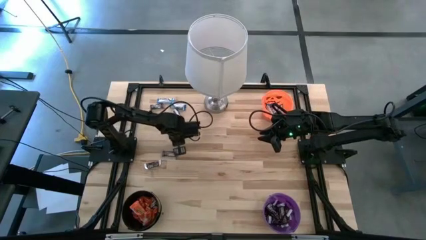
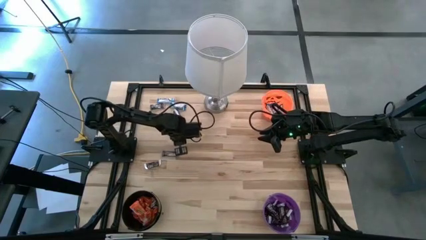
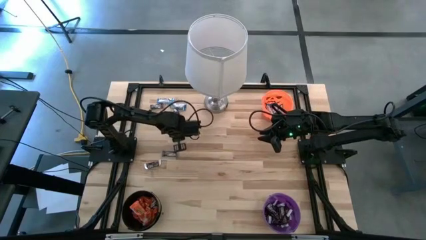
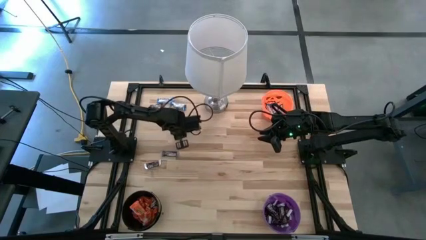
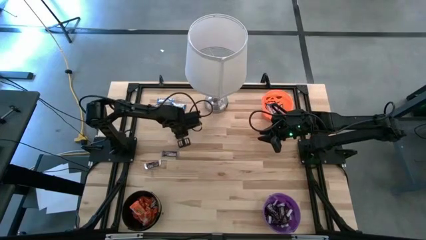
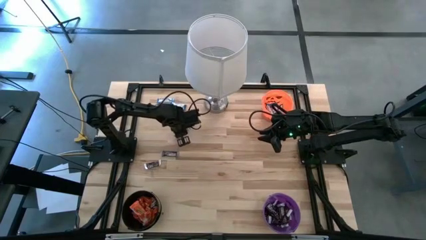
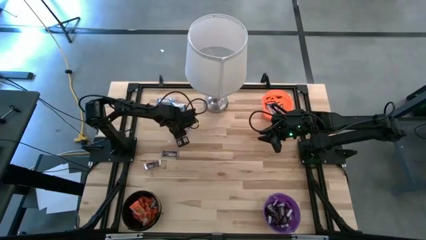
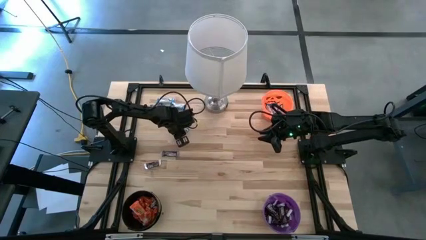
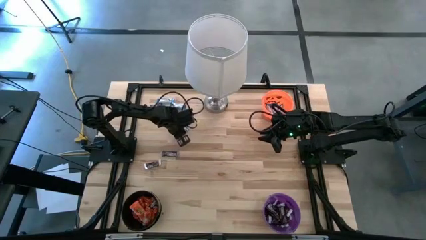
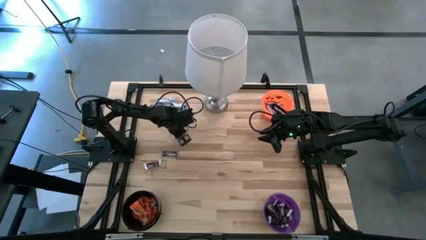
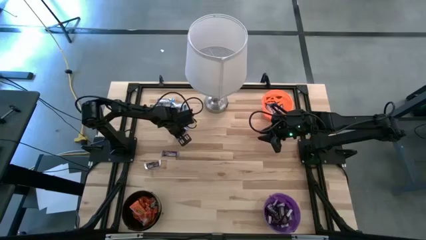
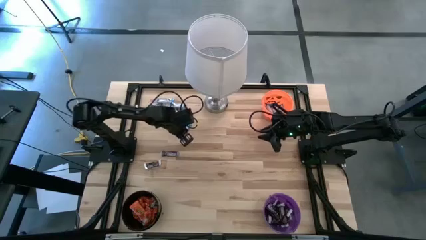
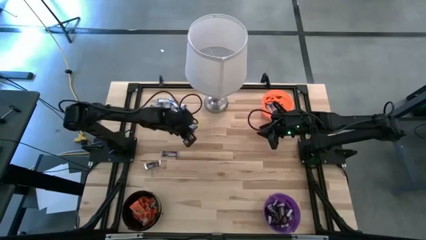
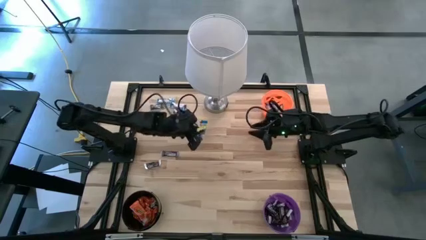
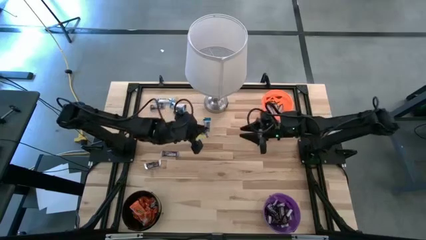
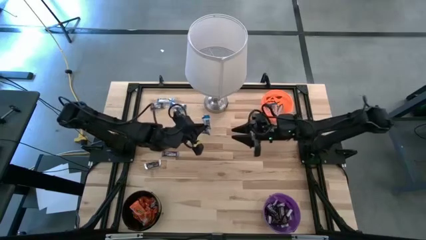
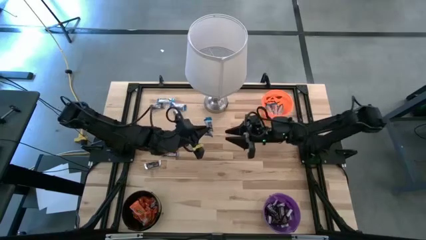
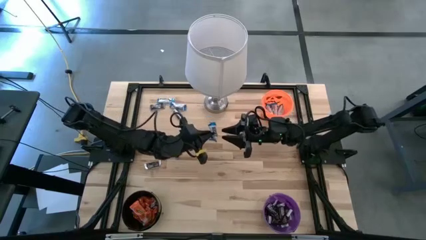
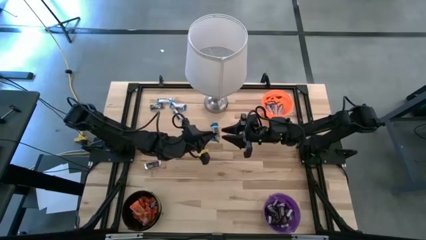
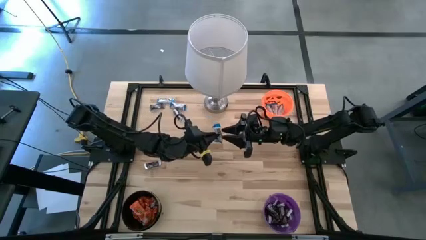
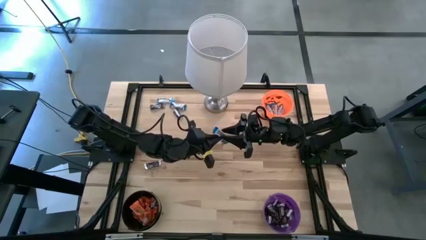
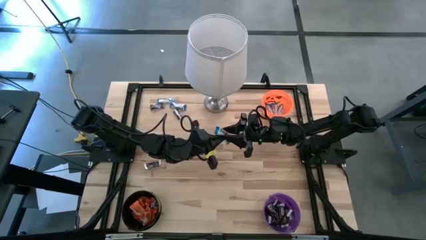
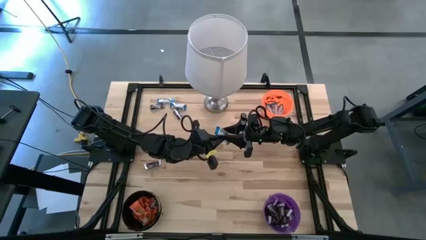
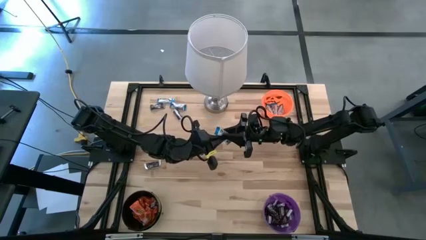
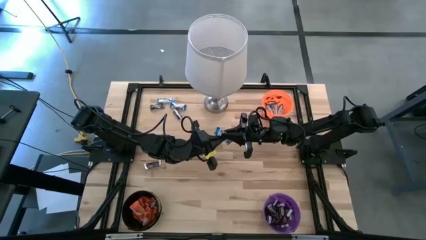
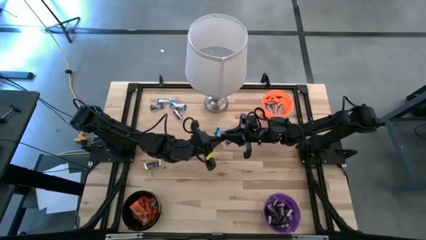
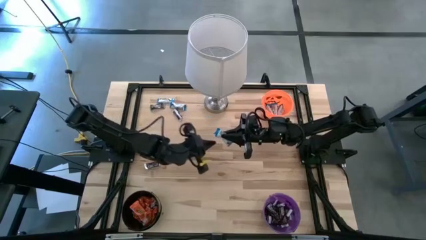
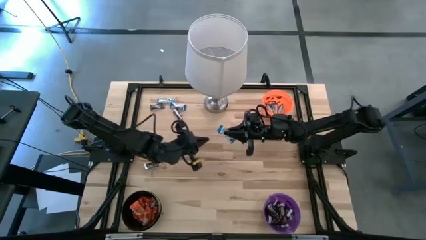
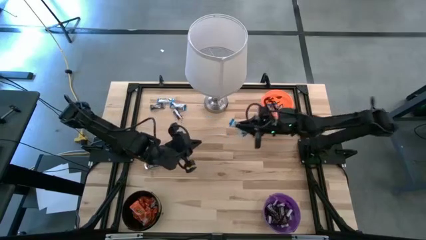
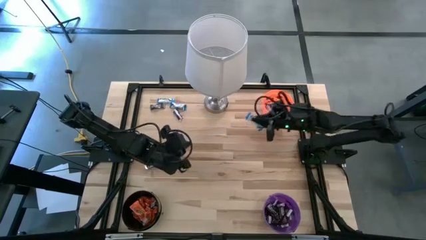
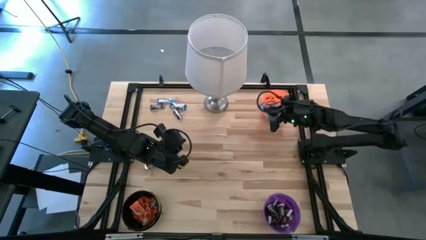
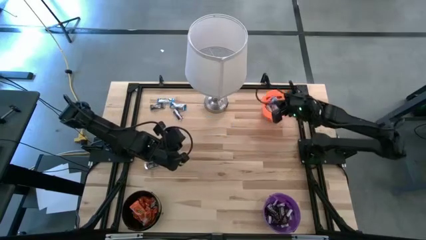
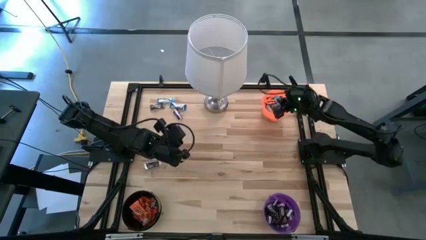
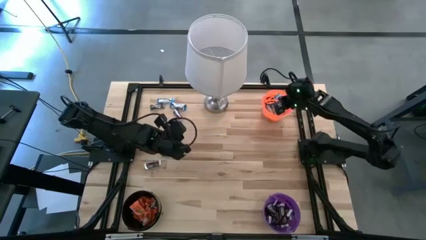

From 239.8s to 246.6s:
Task: Sort candy
Put the white chocolate bar into the orange bucket

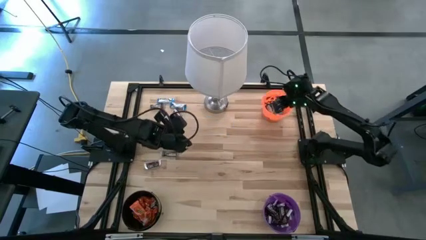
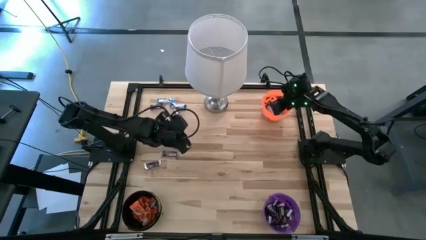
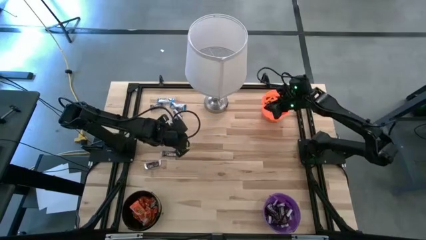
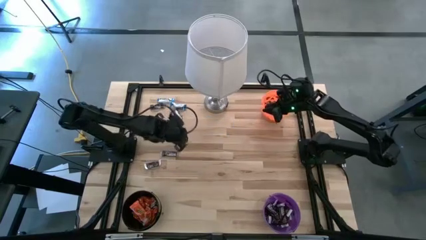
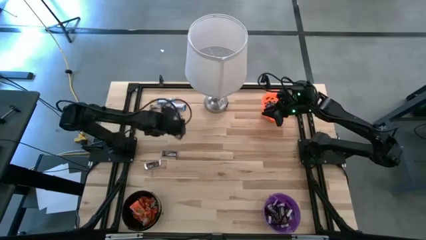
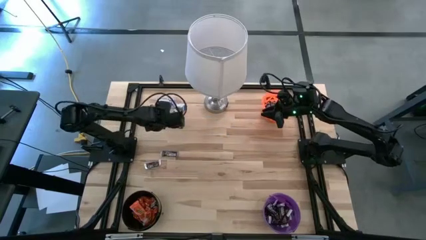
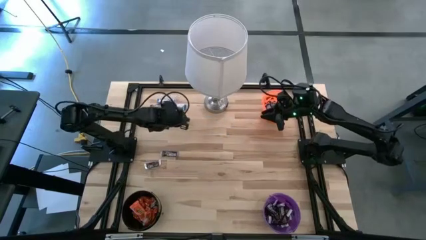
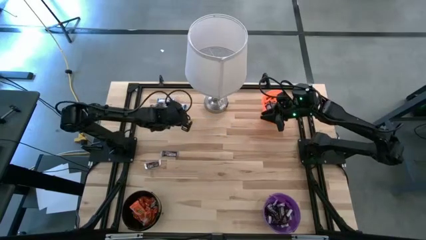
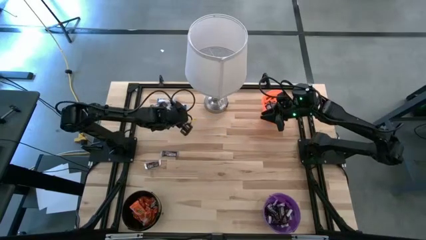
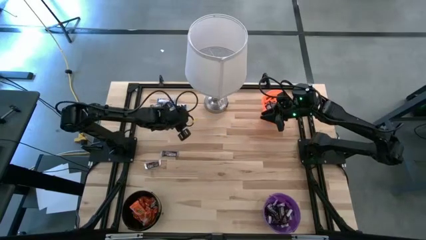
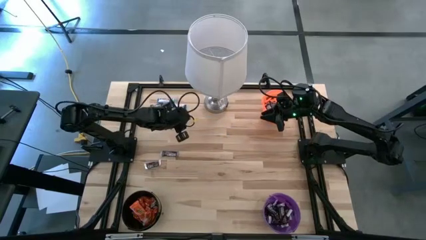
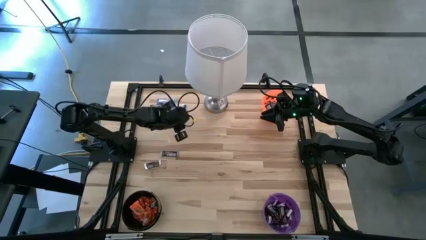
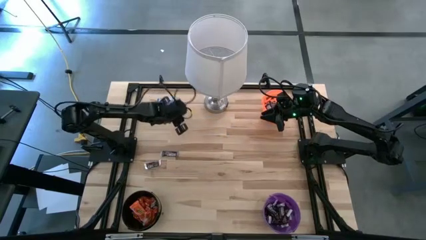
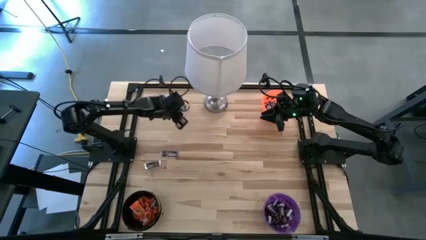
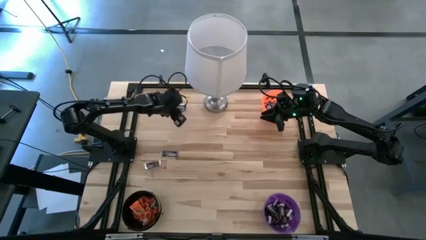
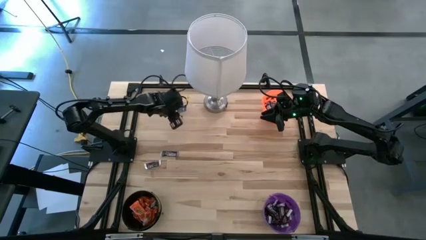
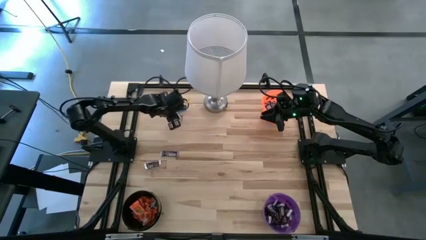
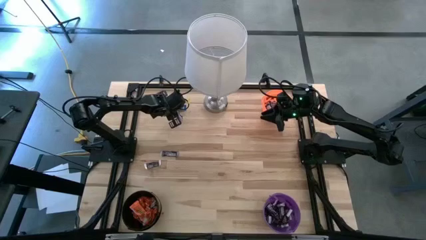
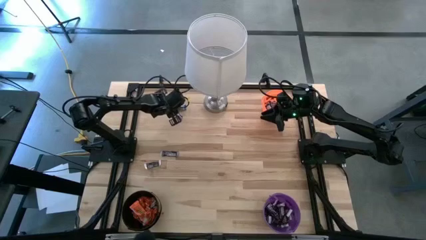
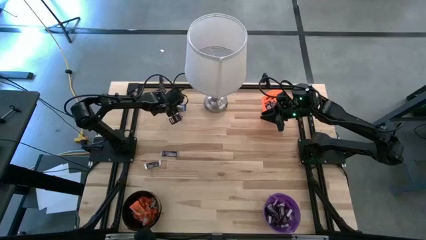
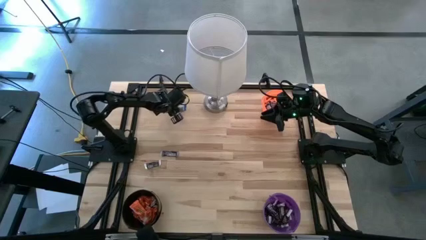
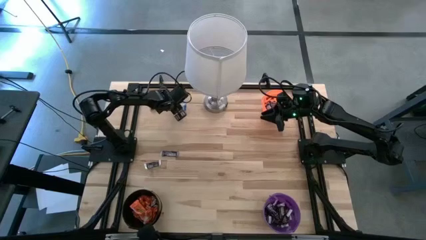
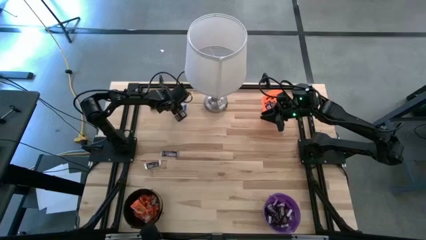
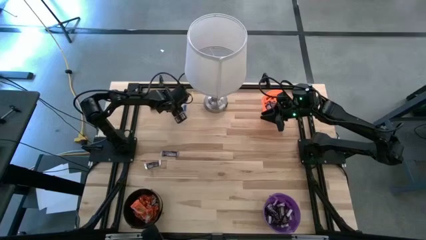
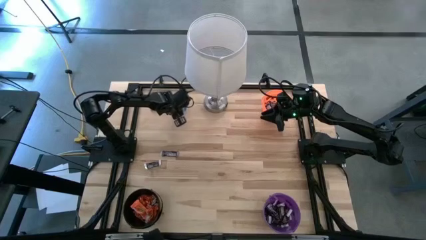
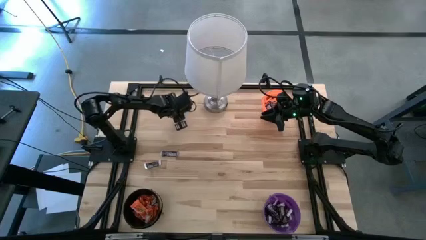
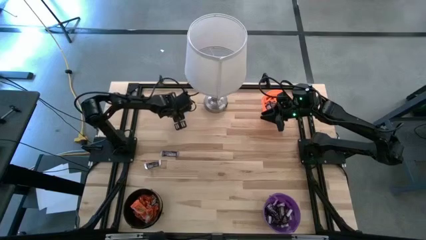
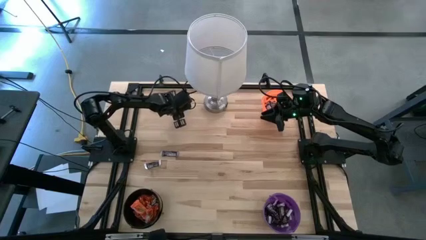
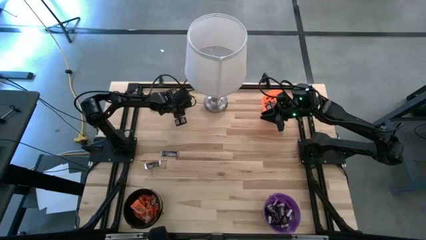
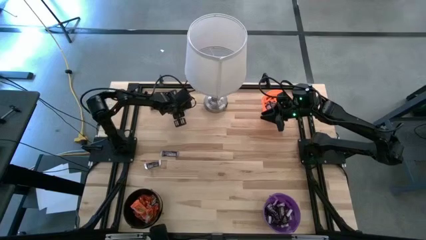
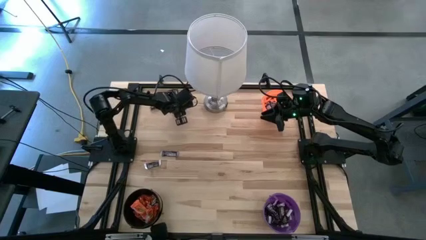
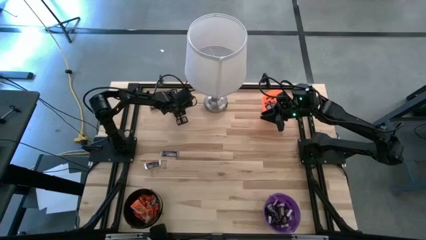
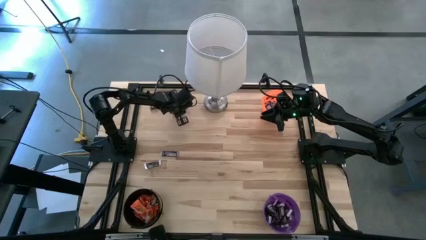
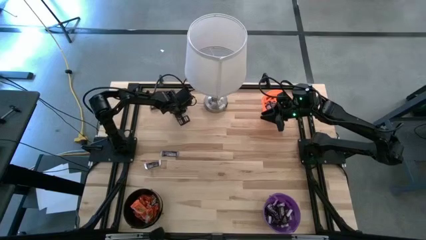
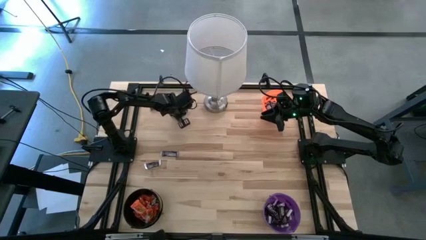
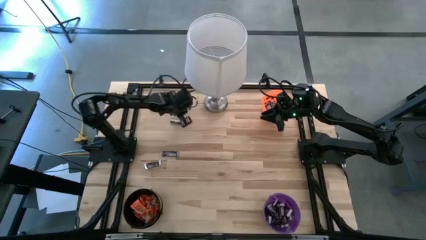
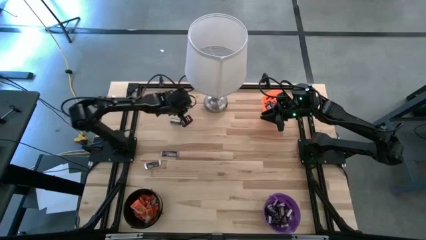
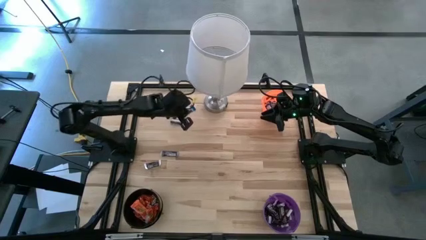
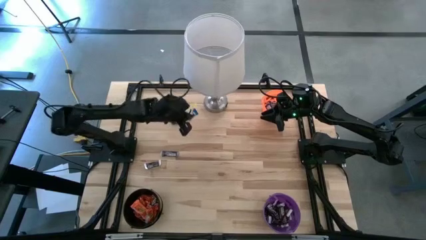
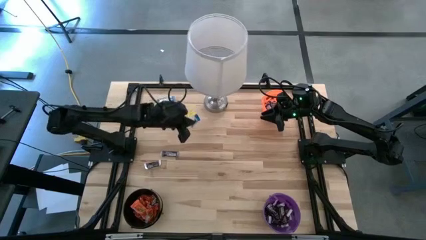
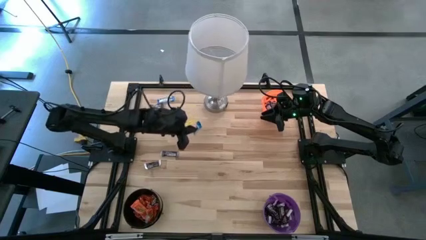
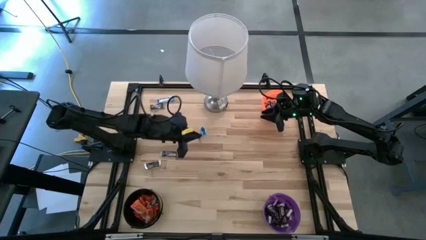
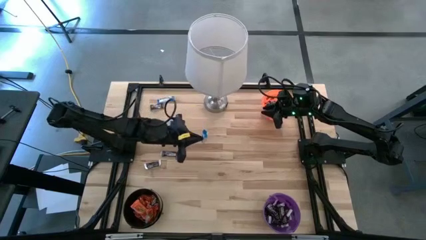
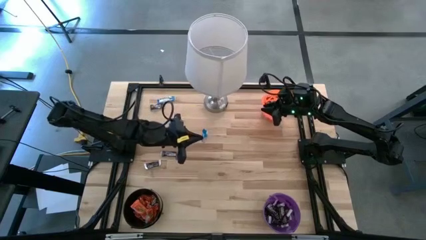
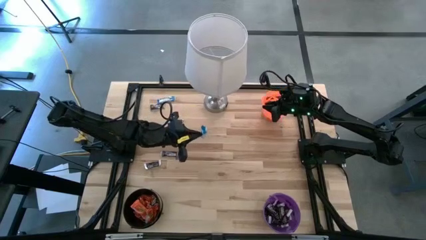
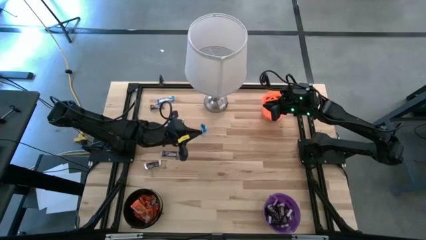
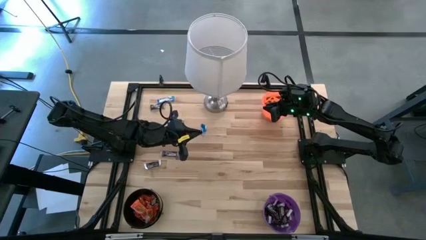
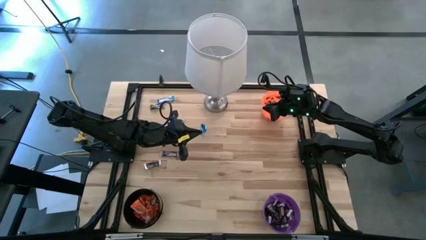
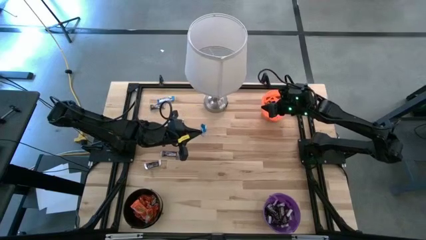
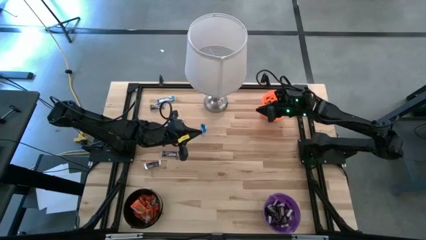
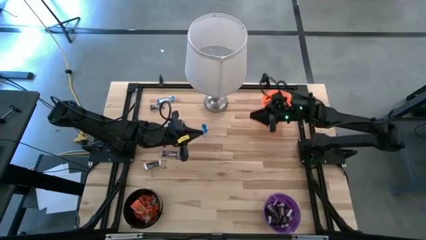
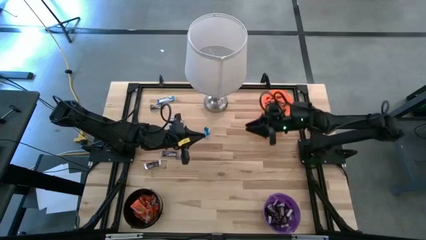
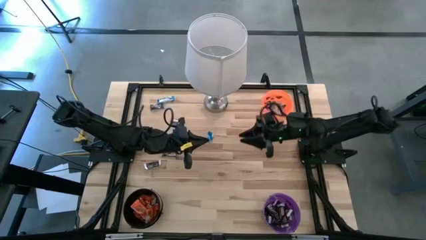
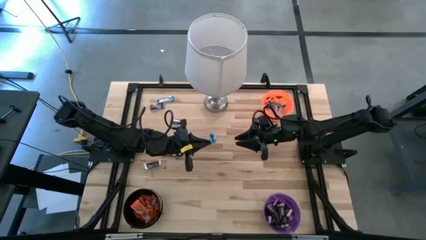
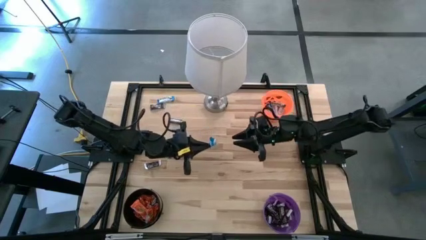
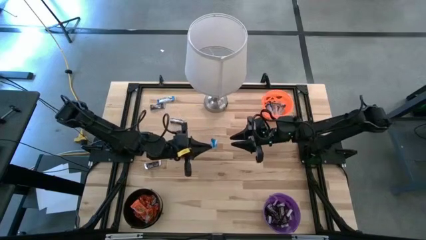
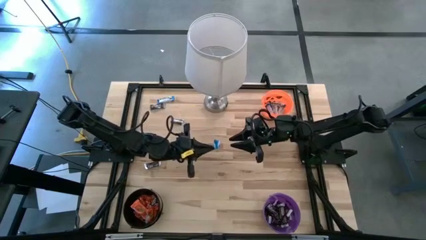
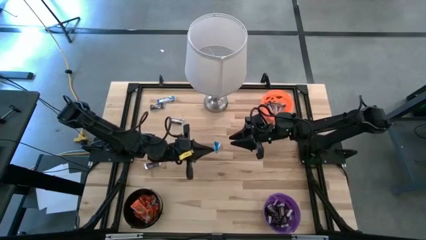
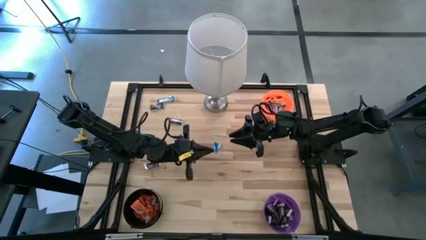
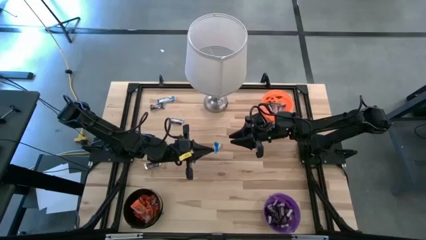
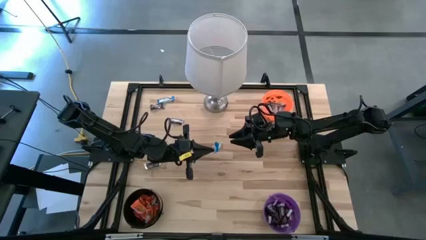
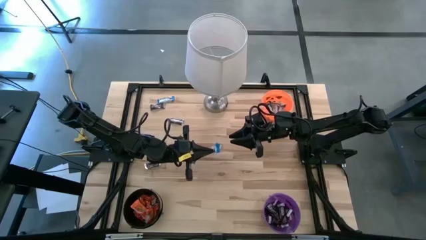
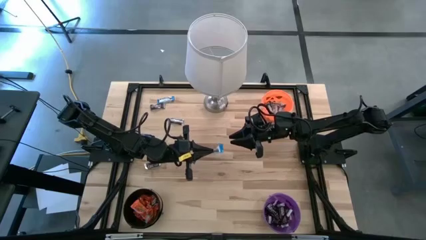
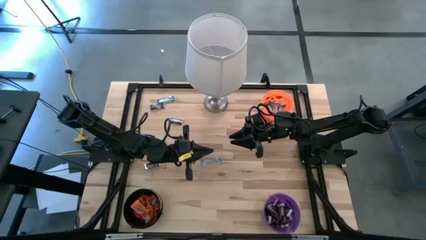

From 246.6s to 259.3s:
Put the white chocolate bar into the orange bucket
